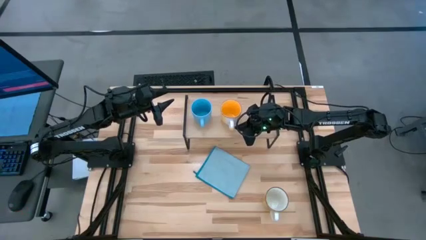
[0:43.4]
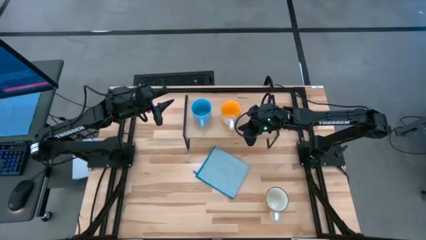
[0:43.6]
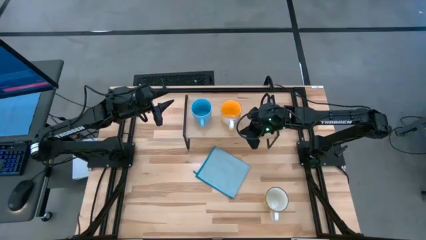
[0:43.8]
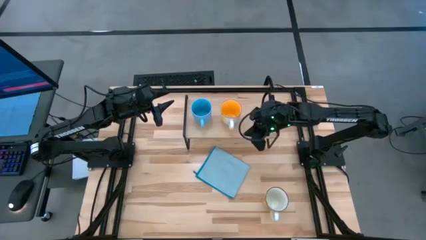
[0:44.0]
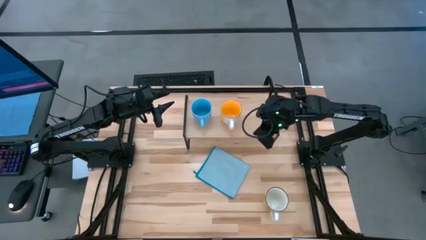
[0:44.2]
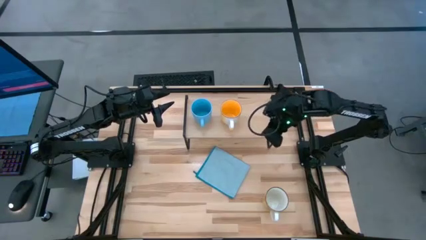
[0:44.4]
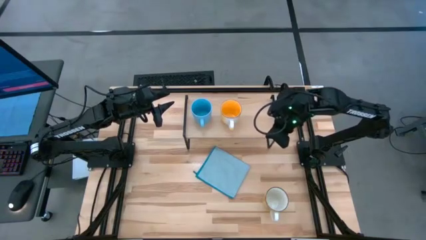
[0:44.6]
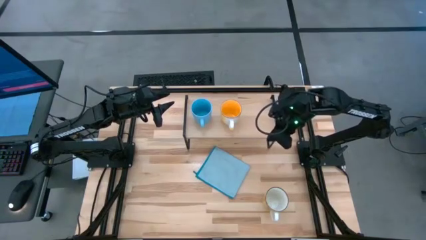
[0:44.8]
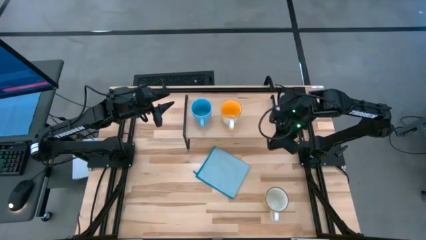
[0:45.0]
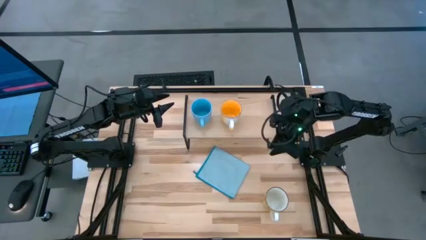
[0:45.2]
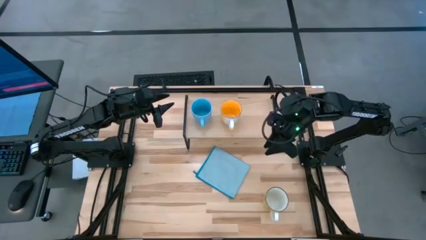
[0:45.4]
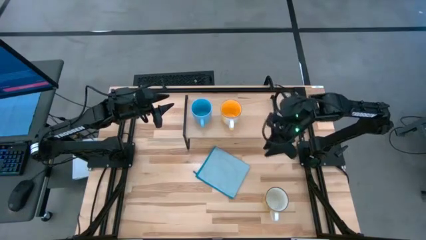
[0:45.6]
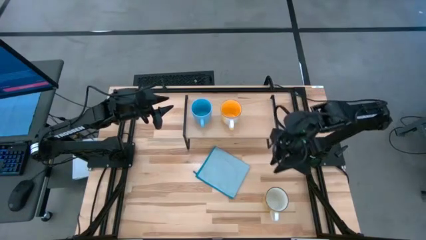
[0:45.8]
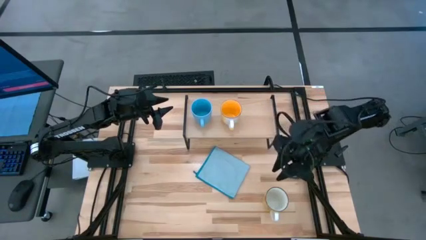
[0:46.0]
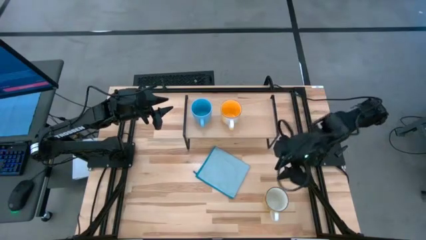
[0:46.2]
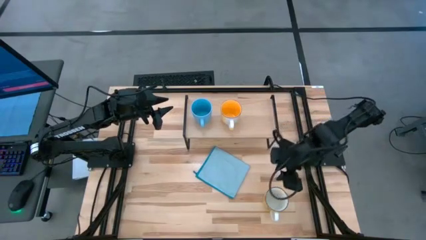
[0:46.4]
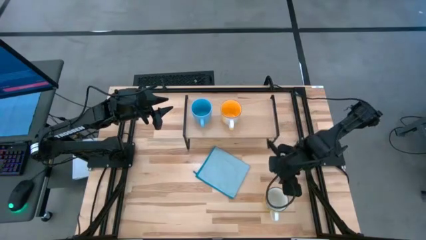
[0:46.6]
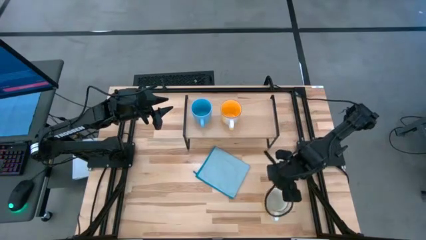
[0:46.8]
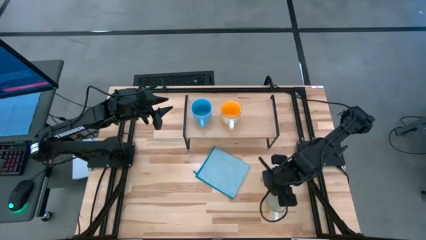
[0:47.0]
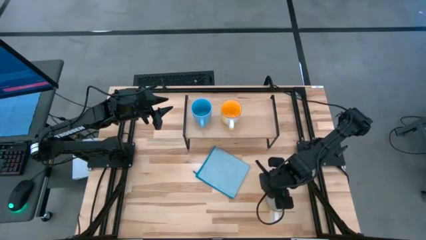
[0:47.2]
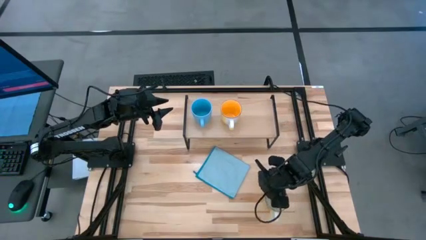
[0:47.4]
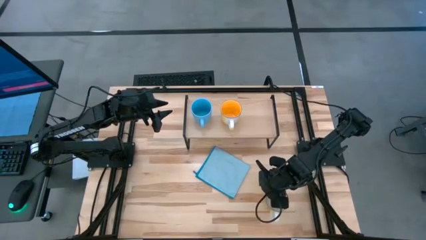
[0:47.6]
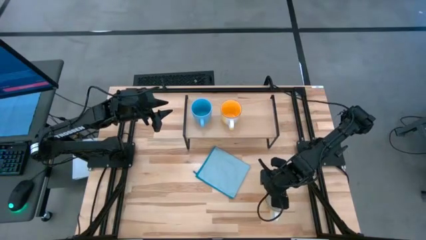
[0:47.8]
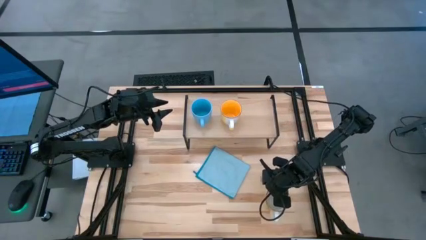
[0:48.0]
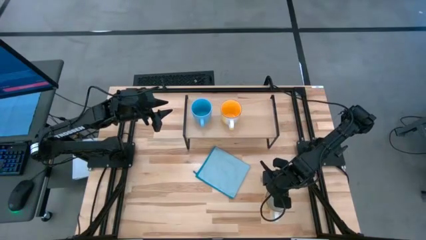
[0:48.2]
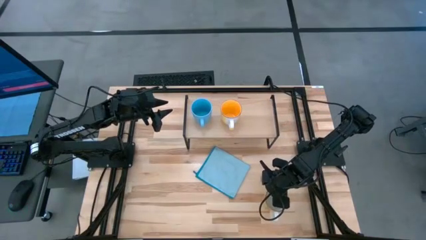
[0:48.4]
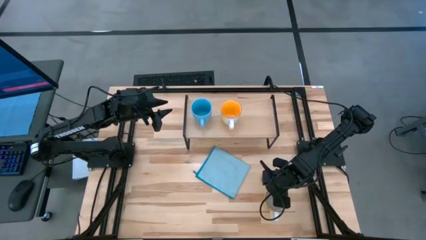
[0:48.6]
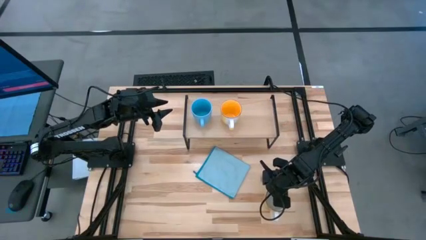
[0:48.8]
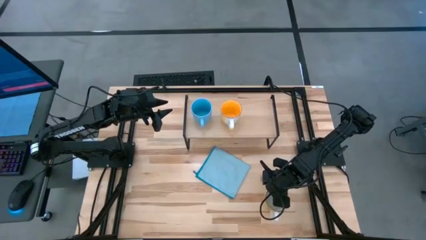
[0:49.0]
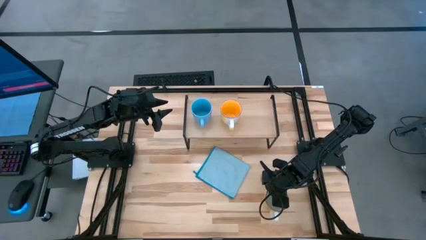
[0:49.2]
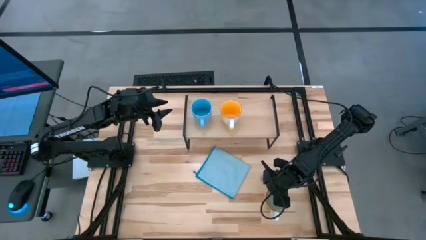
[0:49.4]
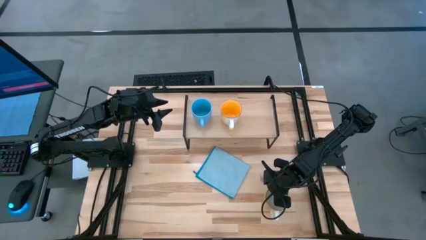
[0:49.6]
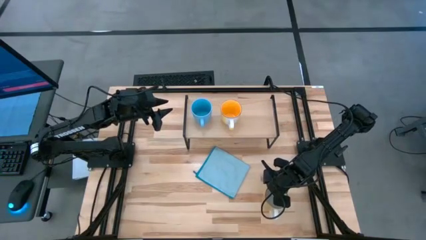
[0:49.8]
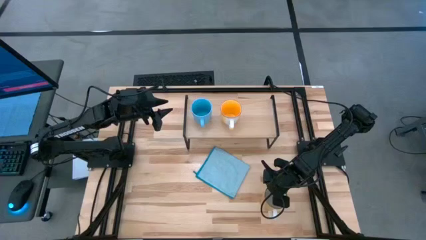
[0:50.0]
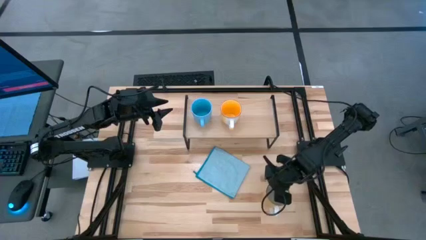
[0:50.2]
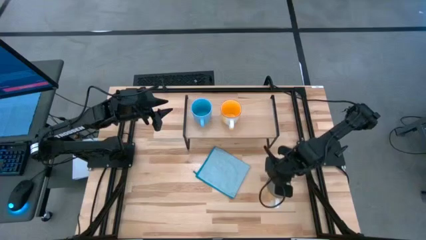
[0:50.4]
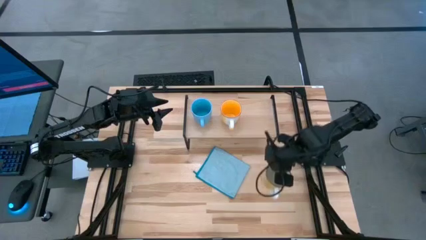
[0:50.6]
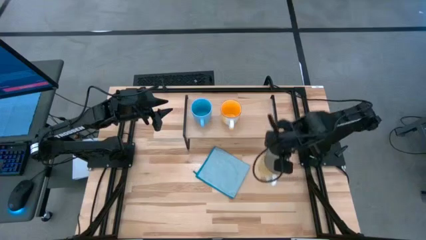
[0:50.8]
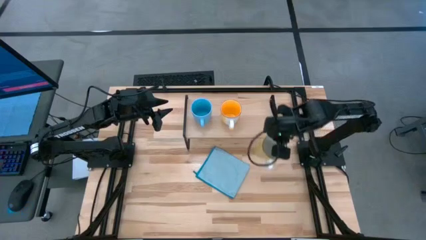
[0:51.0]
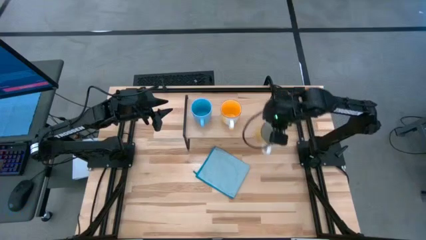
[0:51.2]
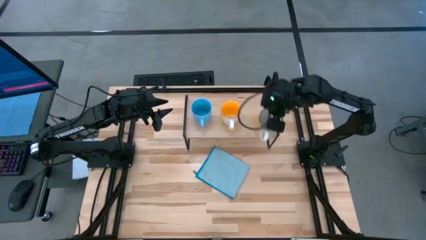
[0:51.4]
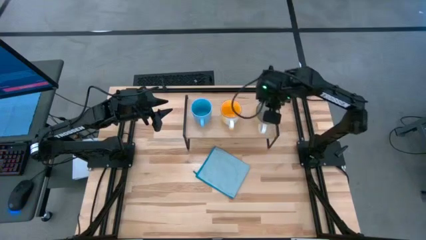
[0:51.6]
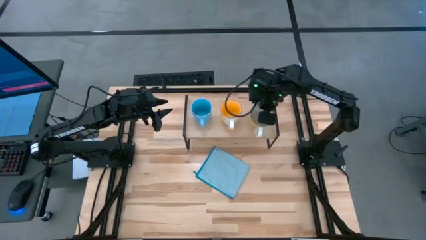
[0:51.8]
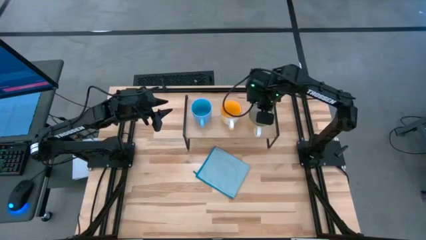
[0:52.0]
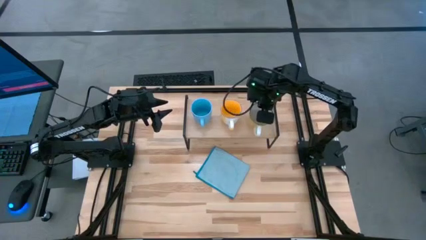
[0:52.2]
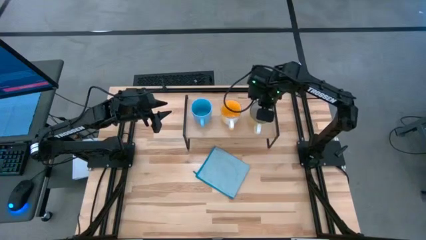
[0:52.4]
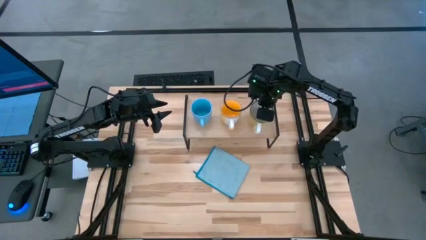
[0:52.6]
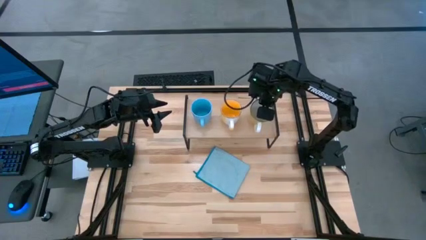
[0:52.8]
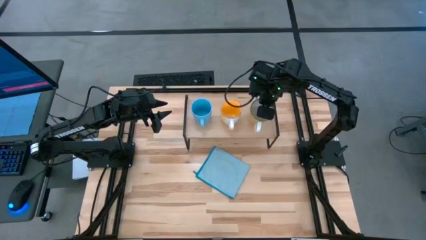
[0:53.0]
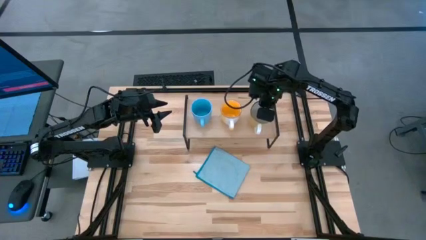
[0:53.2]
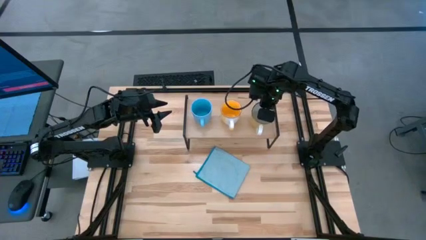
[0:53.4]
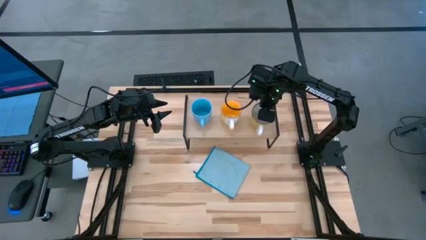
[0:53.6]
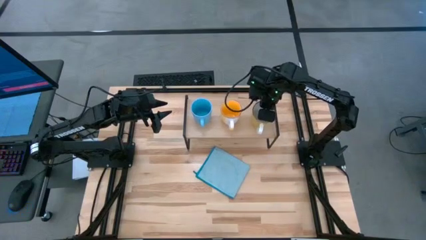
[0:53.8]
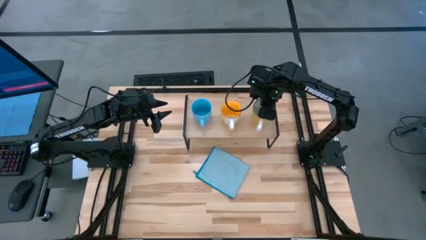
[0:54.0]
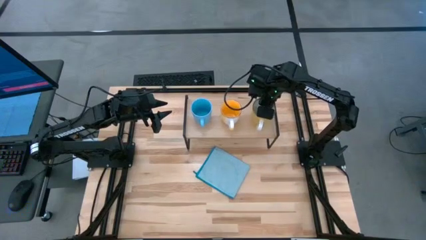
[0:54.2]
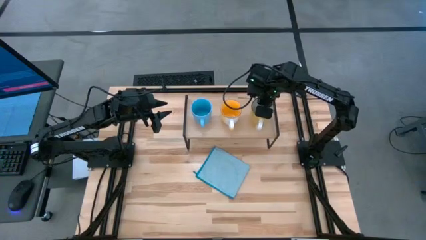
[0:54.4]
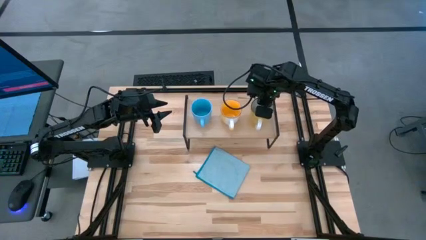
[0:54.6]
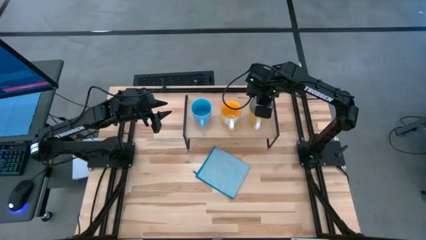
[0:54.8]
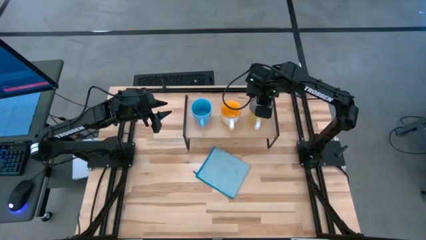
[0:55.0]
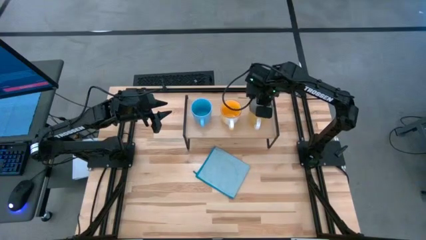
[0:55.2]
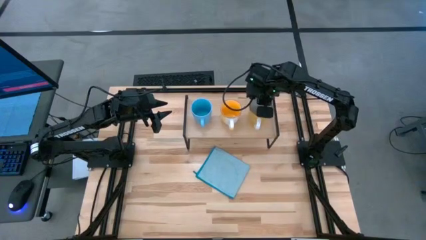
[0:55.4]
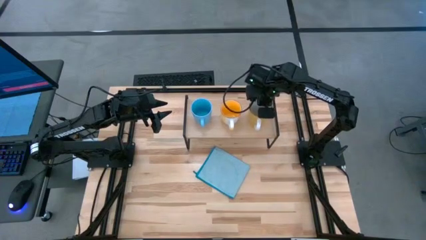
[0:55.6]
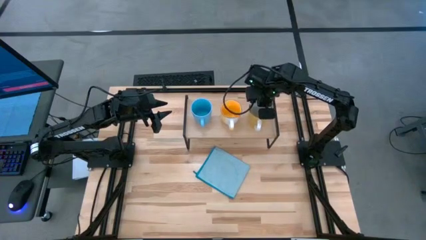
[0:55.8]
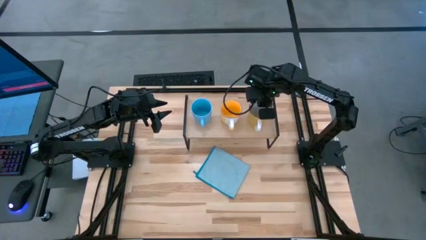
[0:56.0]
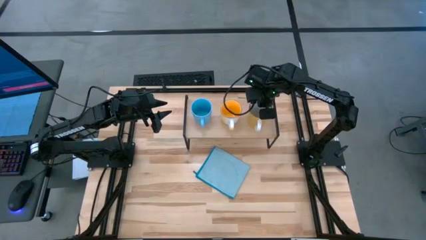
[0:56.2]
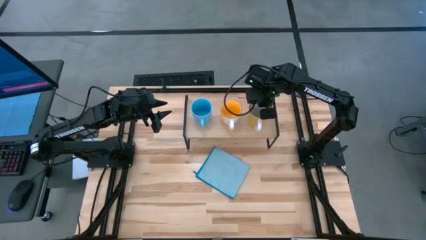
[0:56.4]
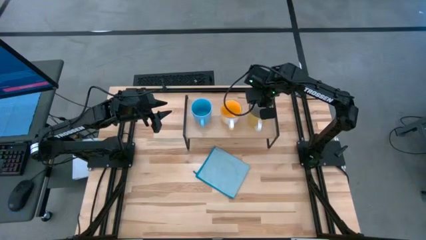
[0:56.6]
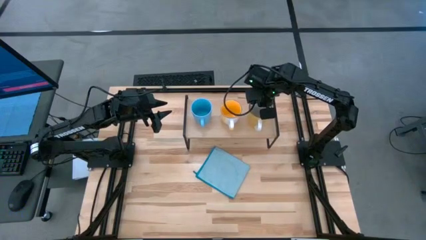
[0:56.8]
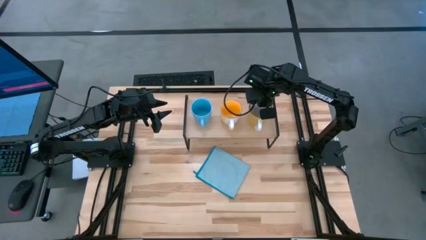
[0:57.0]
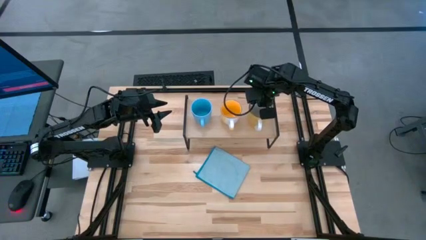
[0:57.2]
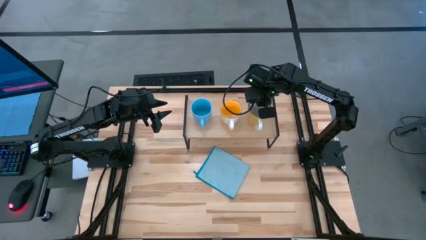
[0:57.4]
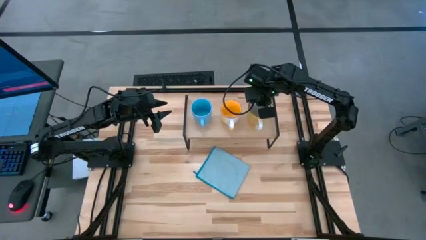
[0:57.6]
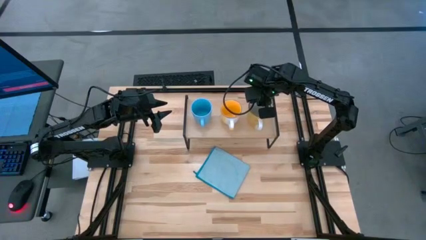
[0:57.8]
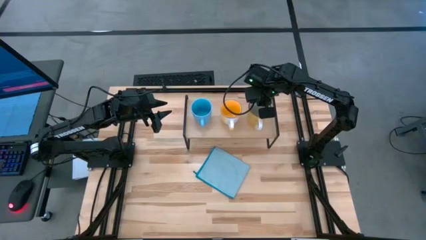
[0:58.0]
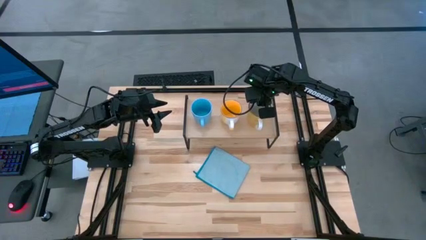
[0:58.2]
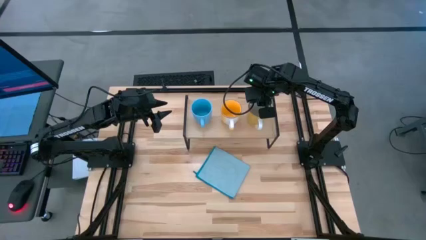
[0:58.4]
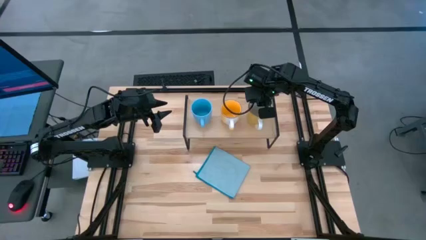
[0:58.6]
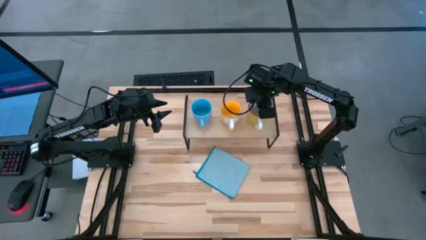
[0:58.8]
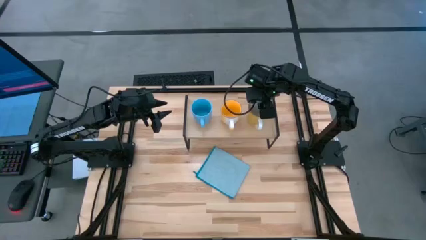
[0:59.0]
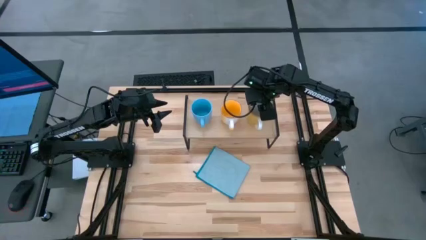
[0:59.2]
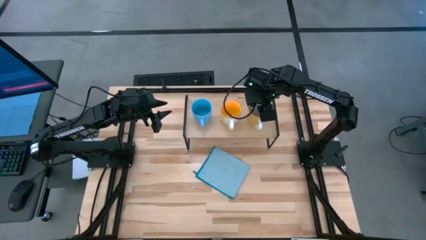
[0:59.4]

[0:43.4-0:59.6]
Task: Stack small to large cups/mugs on shelf
Put the light yellow mug on the shelf

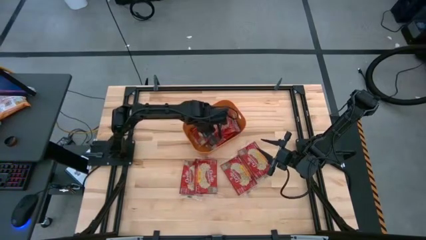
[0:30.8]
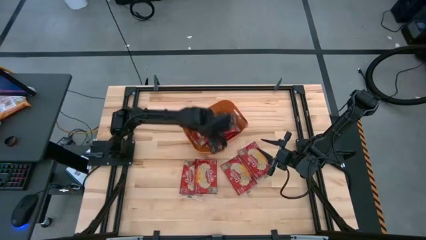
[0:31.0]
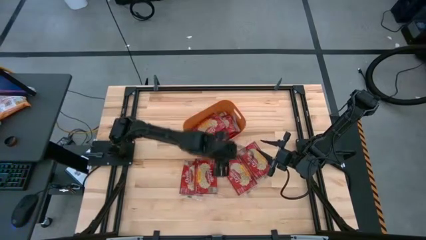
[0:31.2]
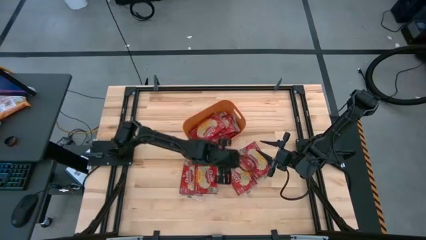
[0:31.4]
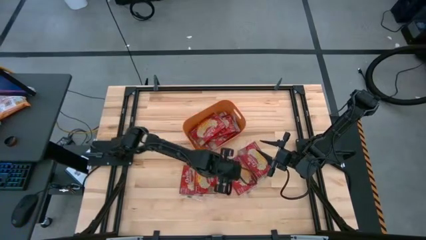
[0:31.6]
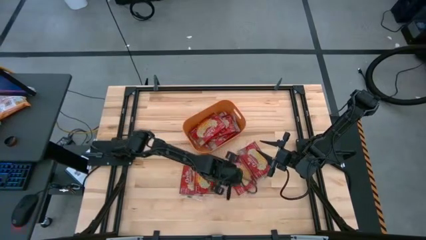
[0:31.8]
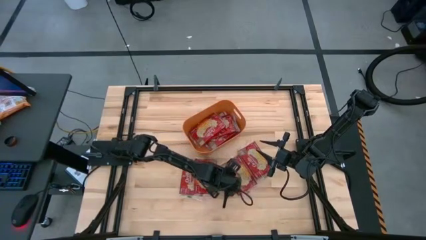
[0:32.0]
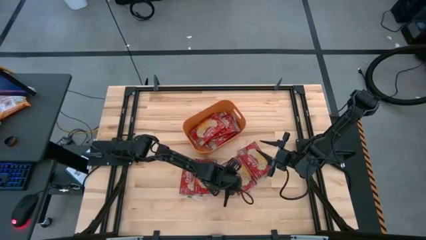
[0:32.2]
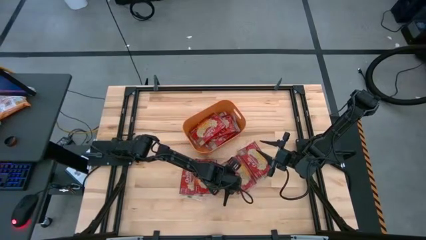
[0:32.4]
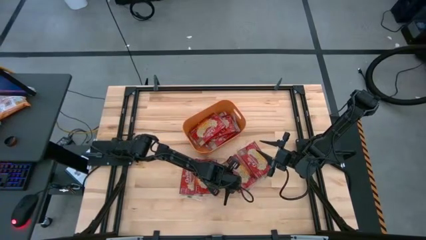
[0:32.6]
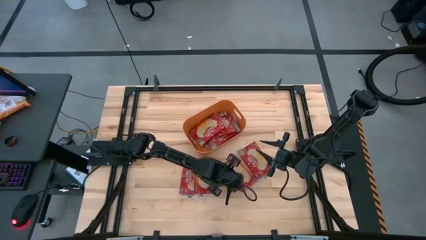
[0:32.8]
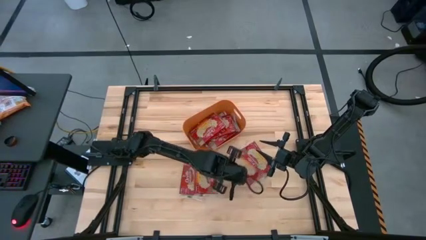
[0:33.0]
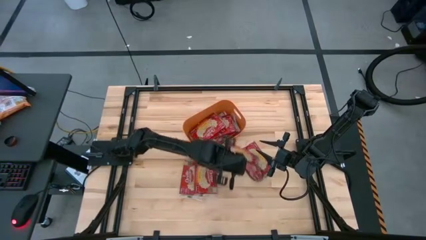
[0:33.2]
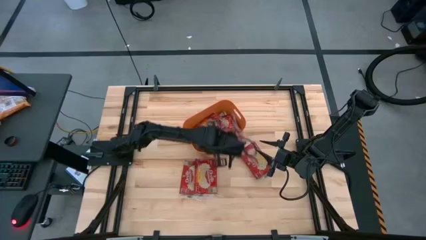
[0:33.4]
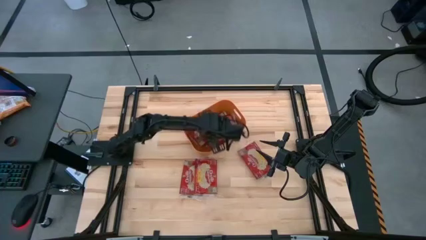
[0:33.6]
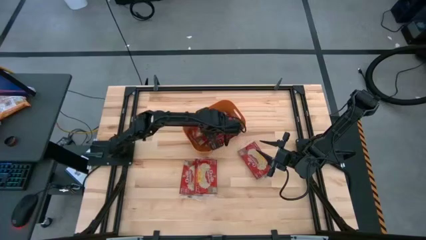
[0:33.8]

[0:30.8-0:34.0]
Task: Sort popcorn bags into baskets
Put the pop corn bag into the orange bin
